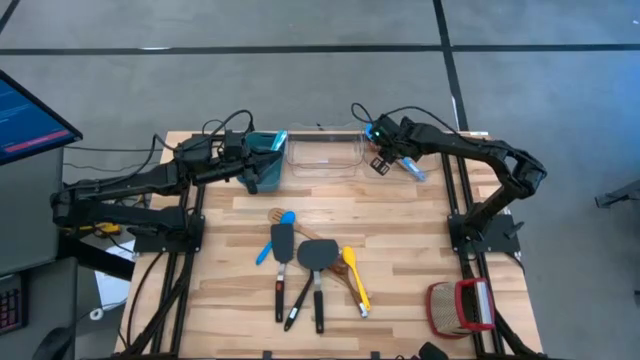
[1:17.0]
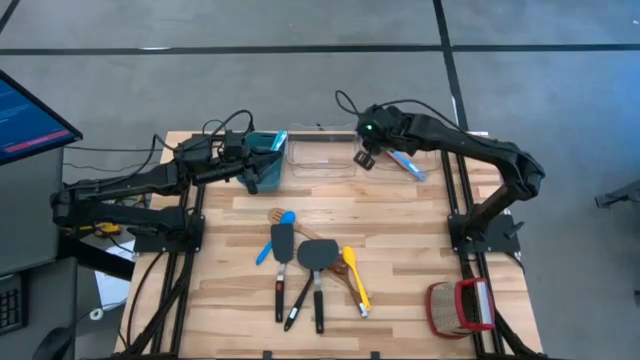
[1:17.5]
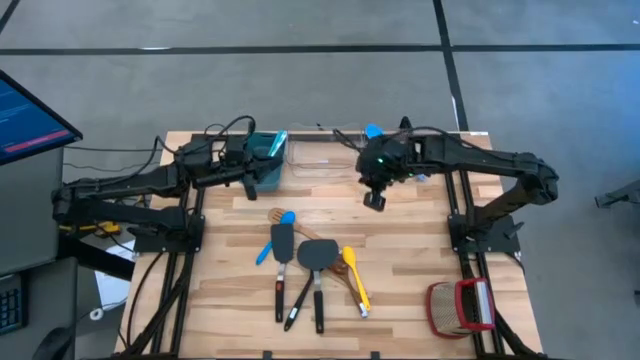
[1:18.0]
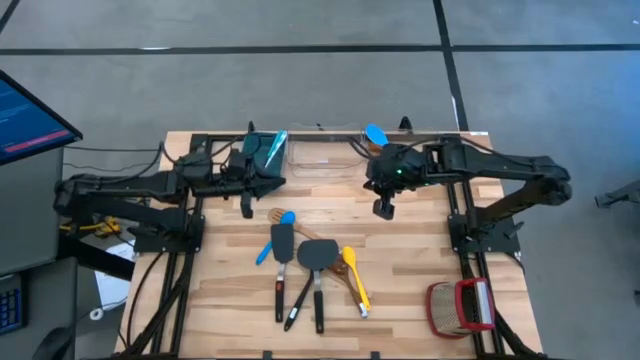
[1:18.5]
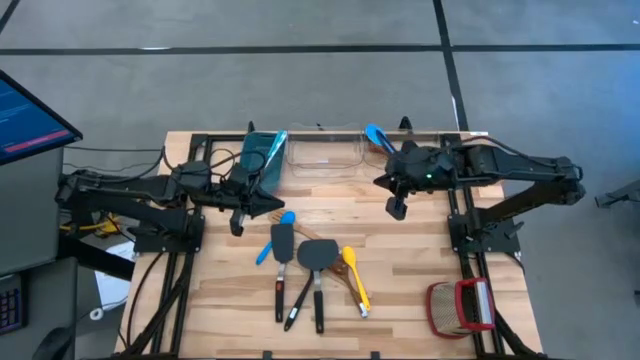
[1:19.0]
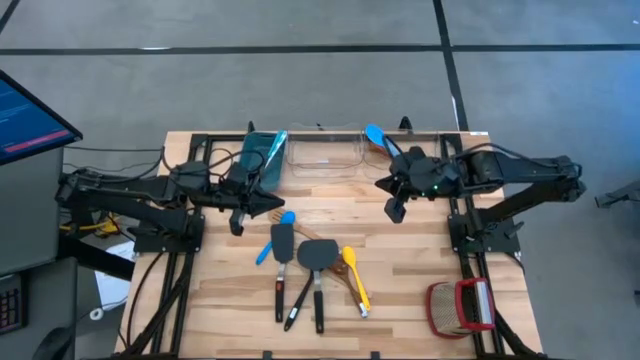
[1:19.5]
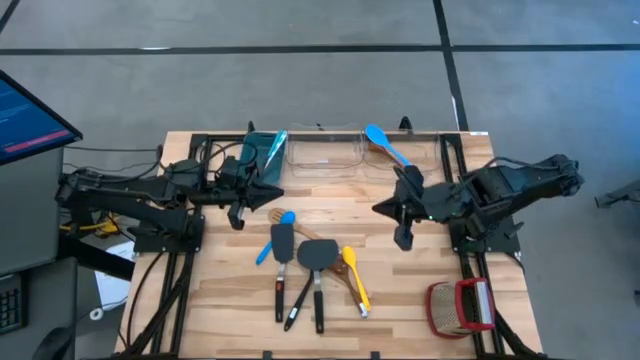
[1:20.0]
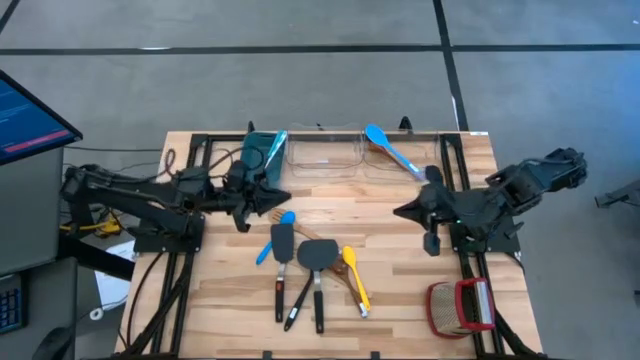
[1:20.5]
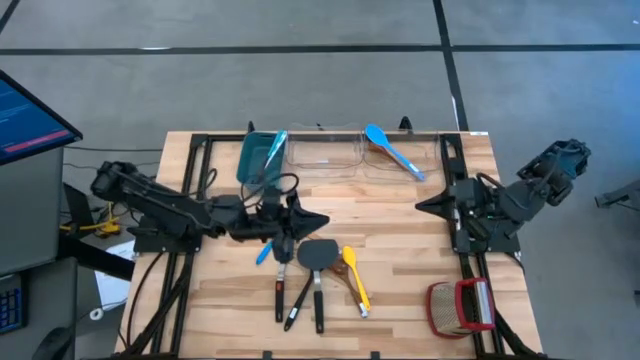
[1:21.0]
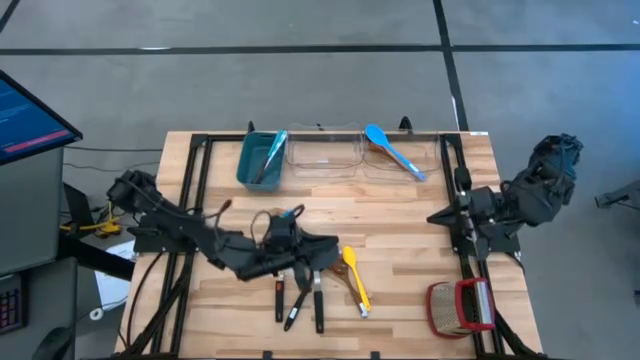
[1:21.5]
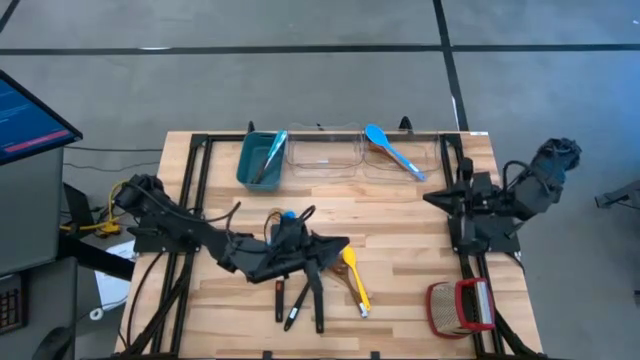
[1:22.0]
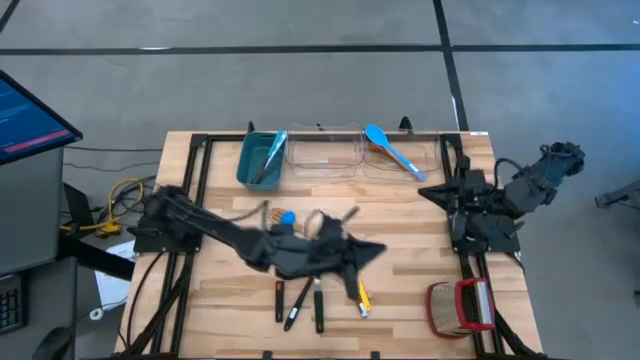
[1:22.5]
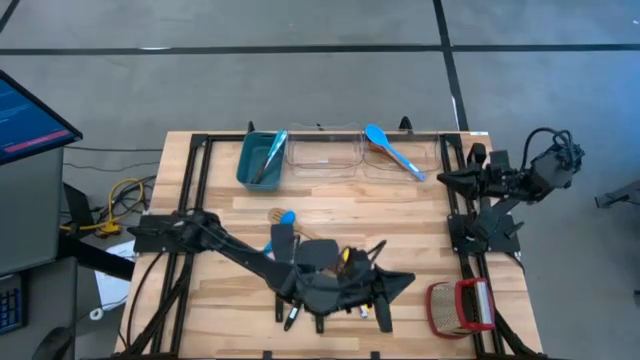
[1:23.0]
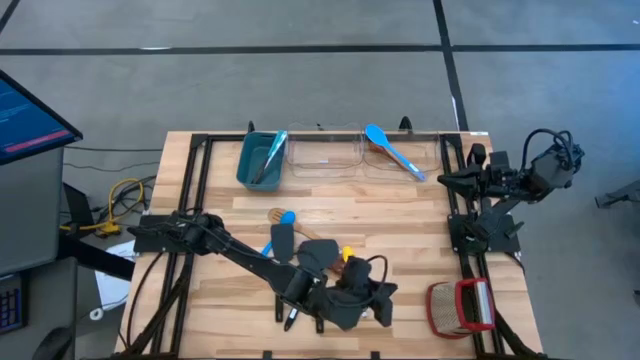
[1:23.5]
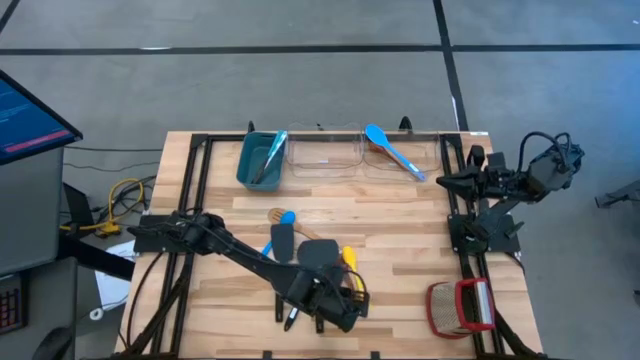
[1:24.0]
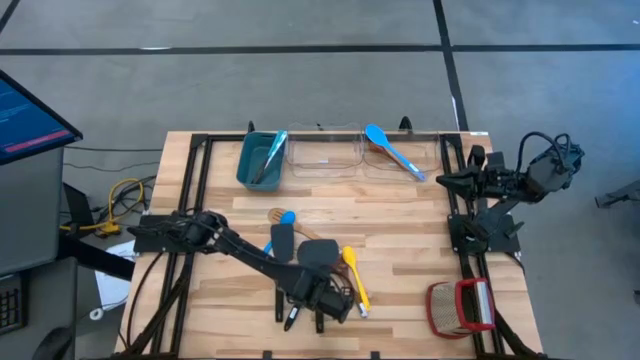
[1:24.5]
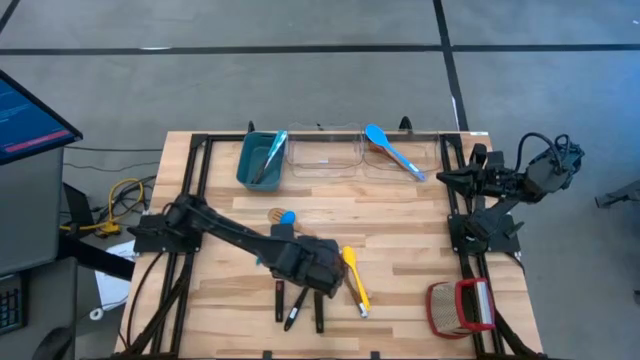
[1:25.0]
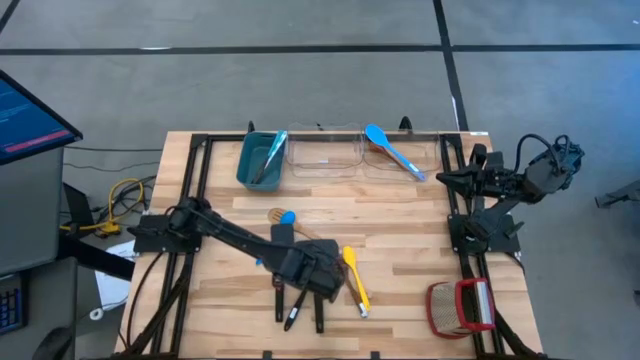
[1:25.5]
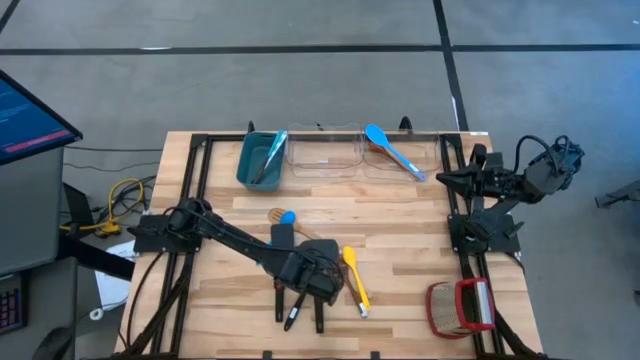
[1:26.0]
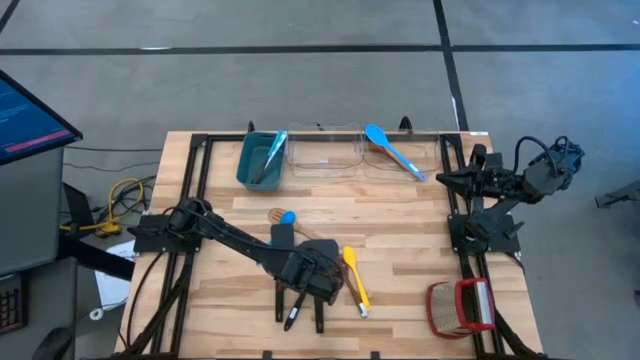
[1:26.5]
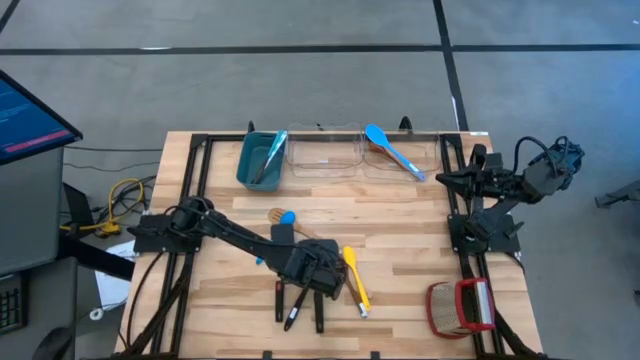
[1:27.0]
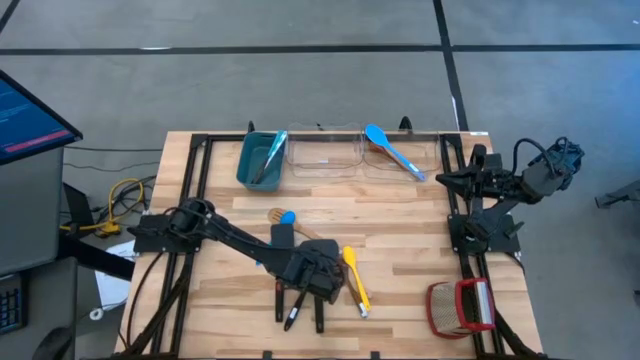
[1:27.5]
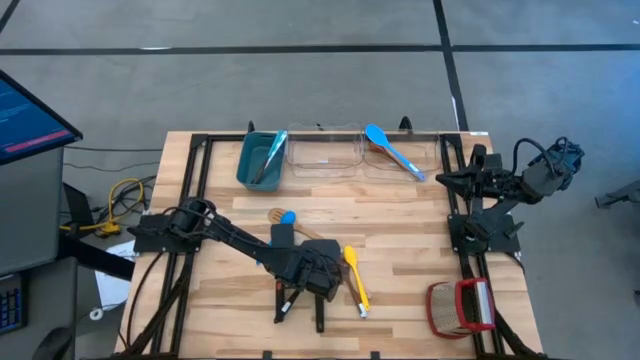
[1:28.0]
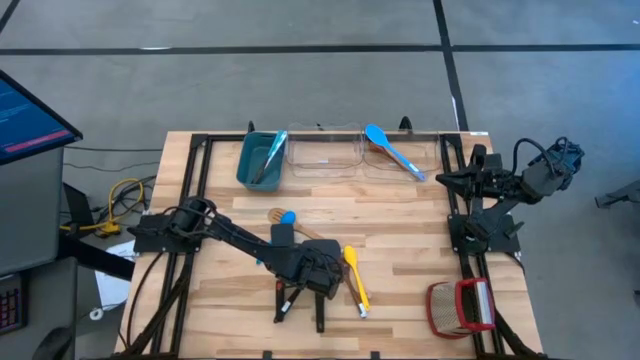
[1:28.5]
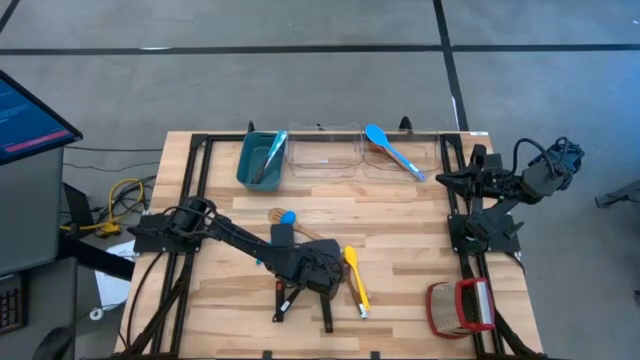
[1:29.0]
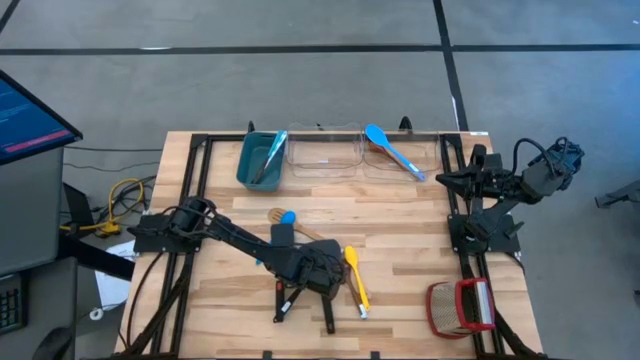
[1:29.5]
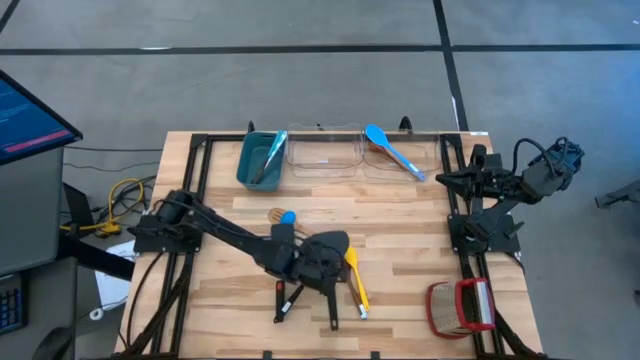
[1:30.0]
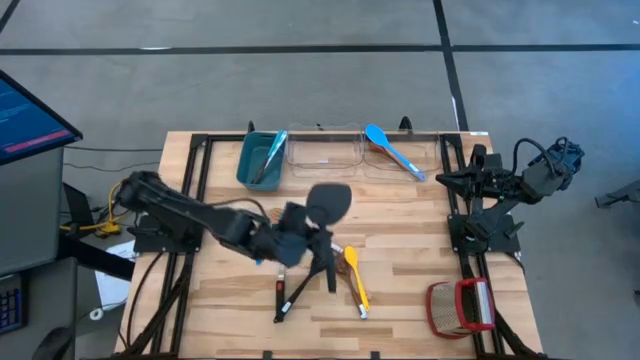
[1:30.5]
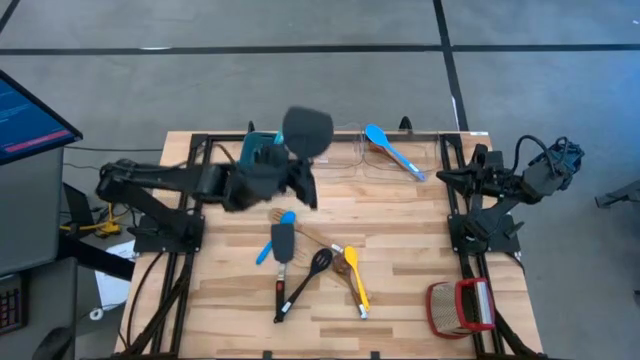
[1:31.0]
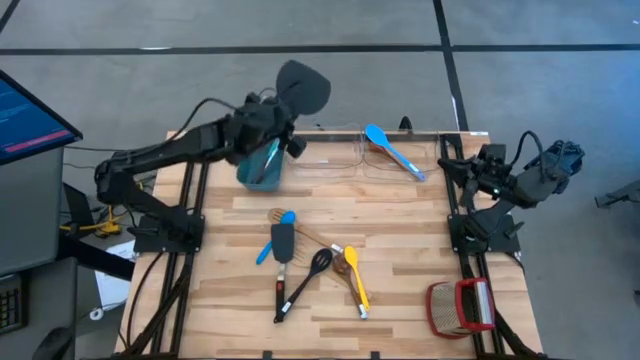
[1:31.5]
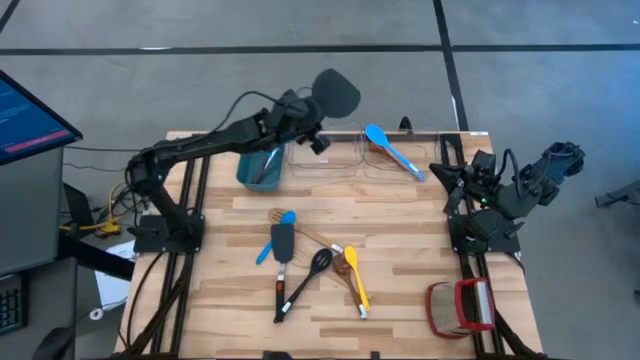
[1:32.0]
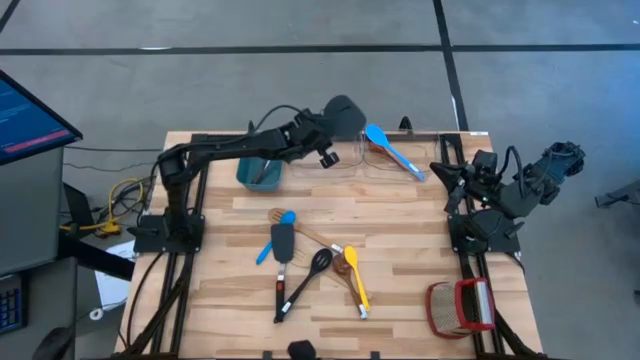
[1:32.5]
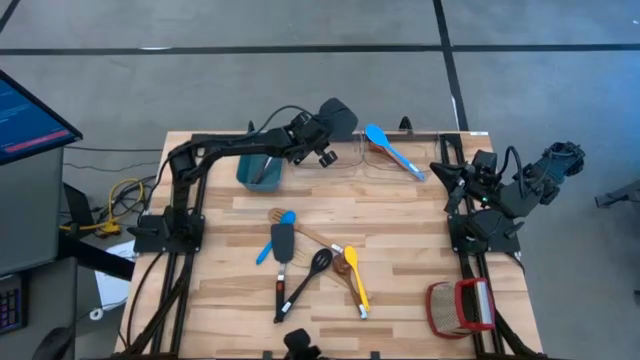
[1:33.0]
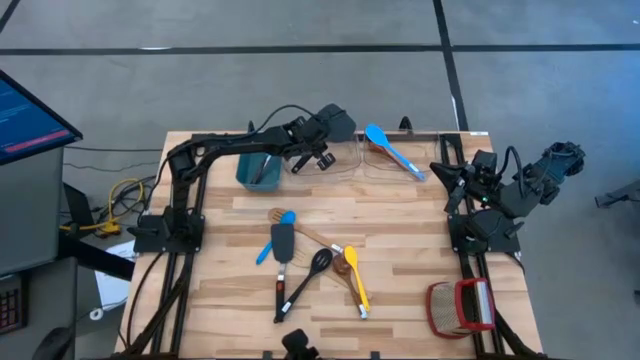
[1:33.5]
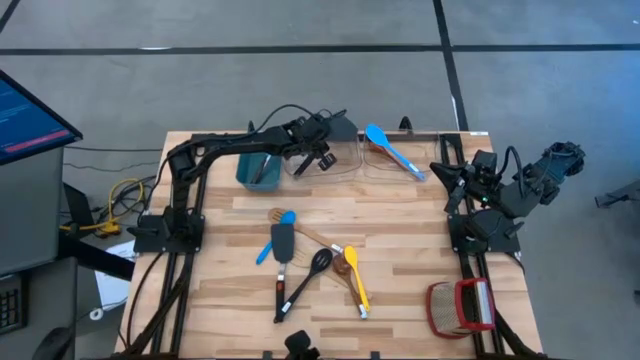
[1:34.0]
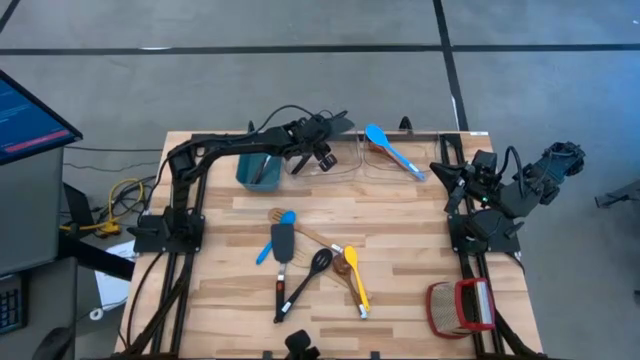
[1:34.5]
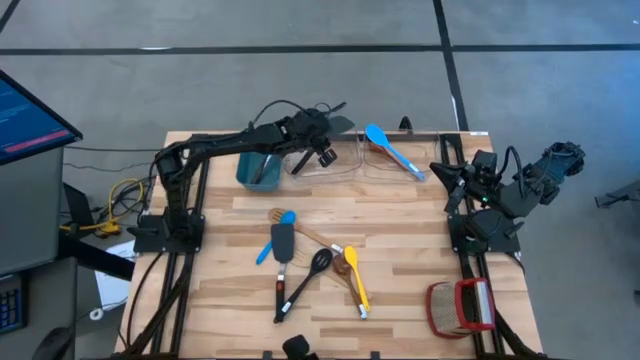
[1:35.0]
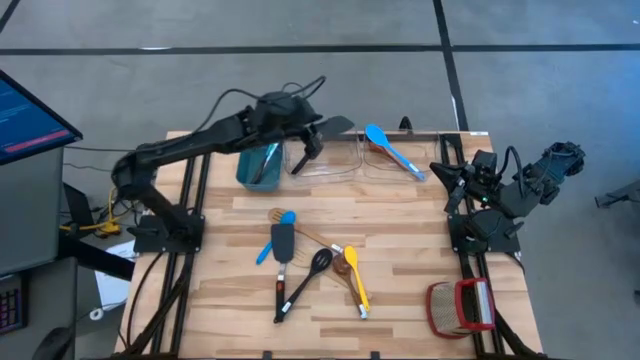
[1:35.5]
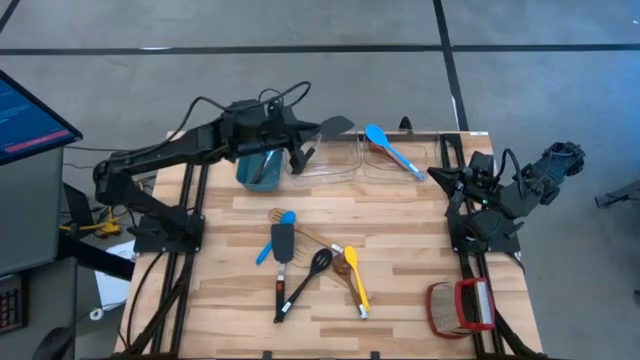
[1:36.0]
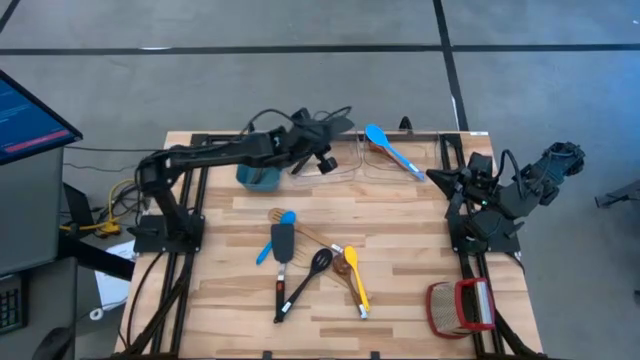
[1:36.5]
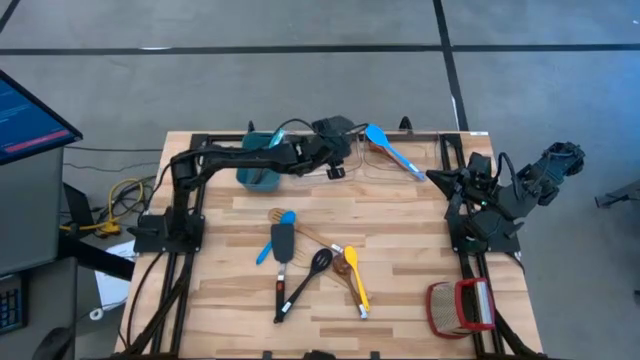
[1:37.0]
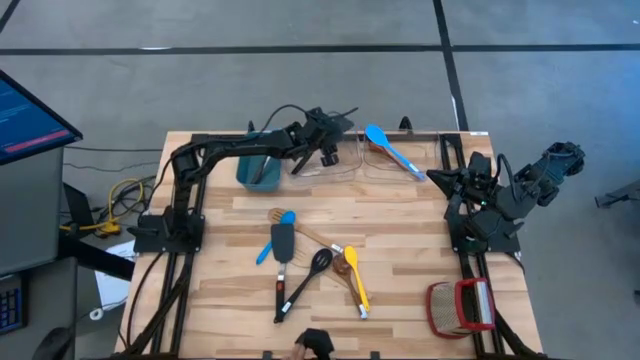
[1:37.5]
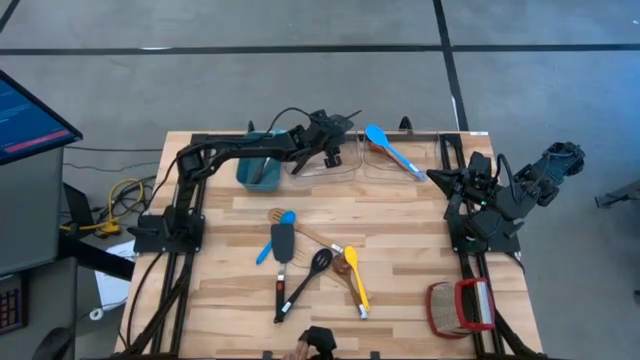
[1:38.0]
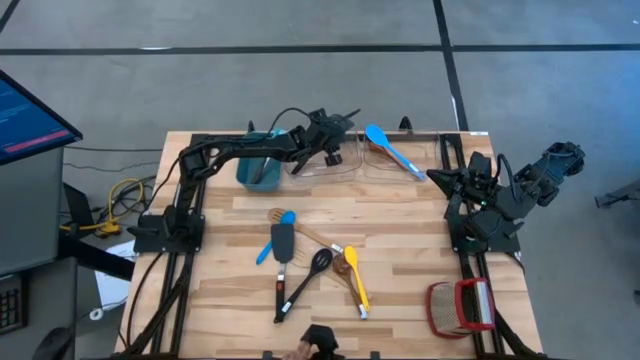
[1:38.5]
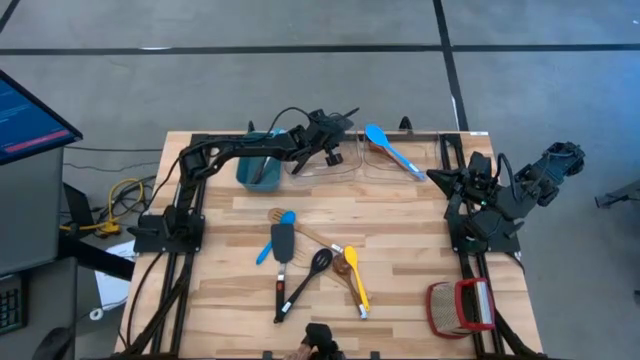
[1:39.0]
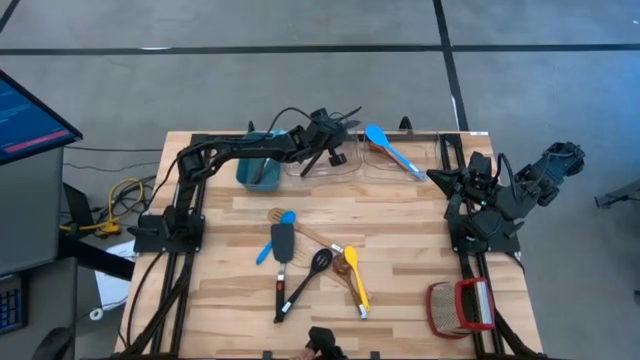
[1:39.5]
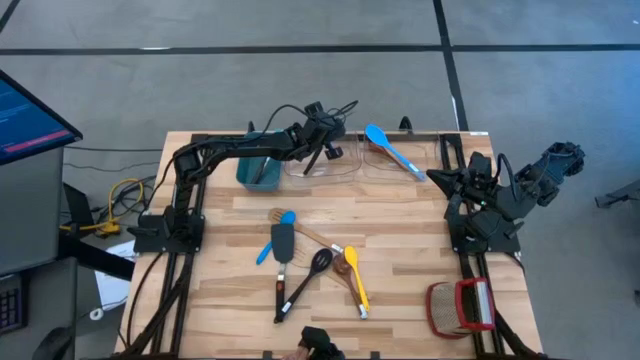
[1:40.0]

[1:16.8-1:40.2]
Task: Pick & Place Kitchen Items
Put the black spatula into the left transparent bin
